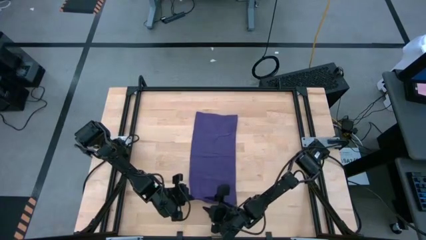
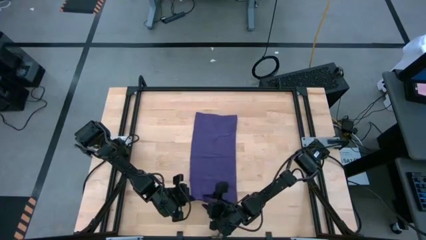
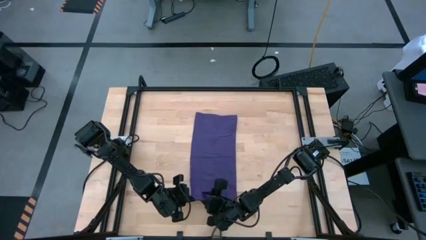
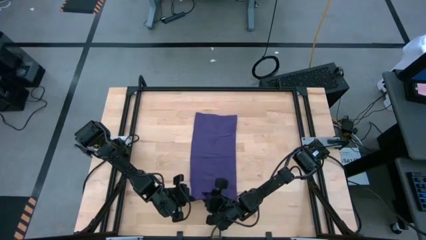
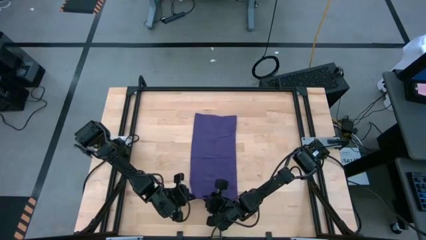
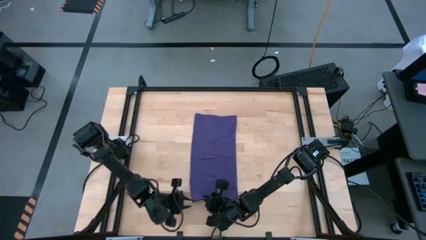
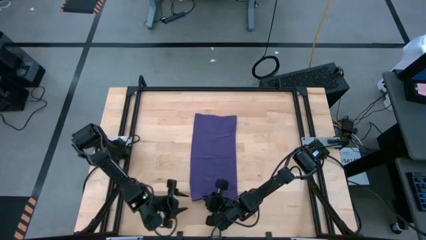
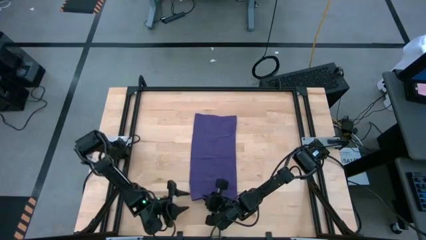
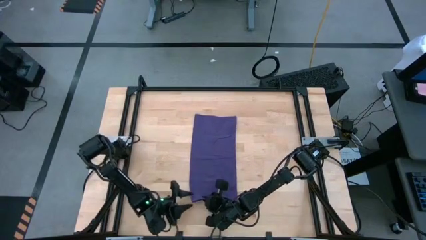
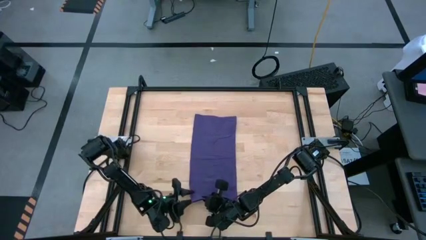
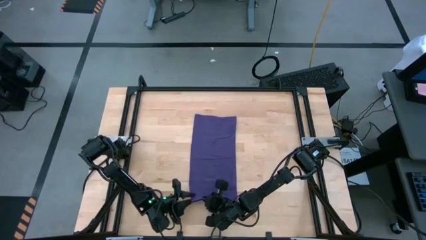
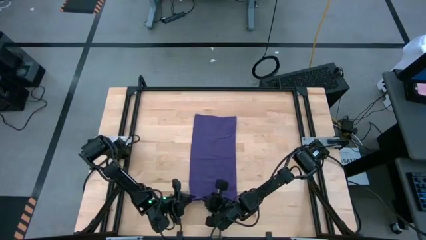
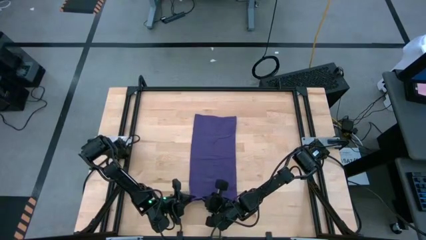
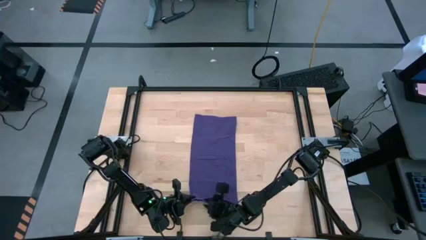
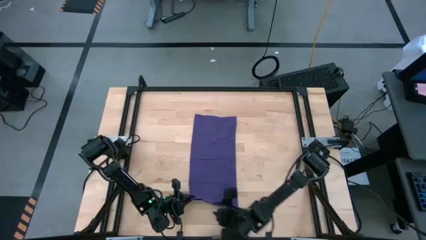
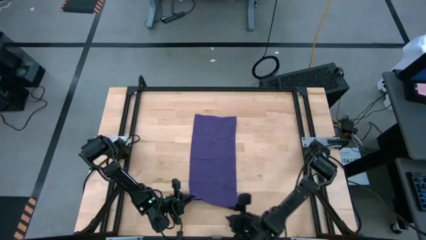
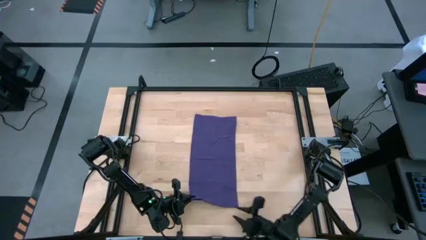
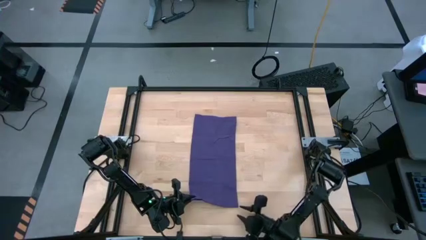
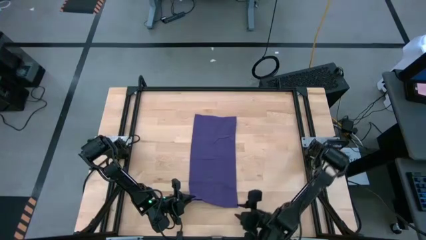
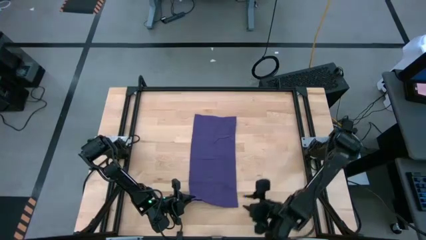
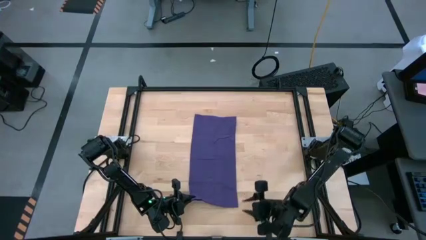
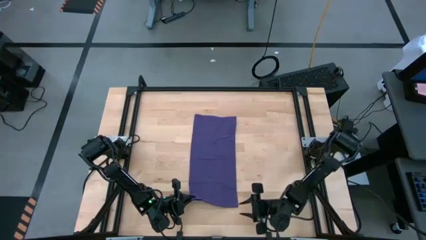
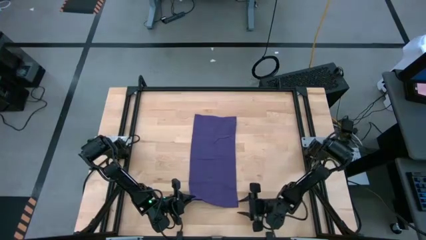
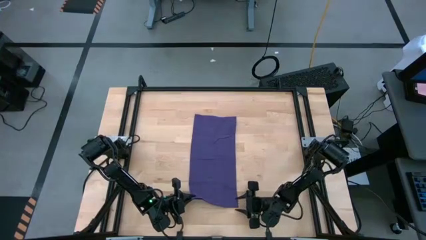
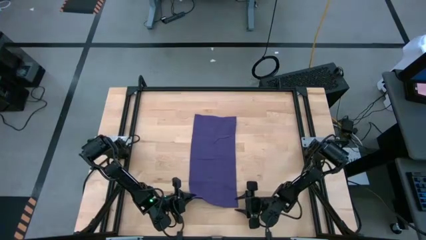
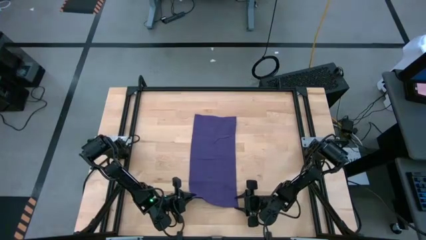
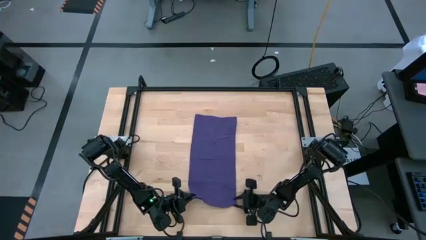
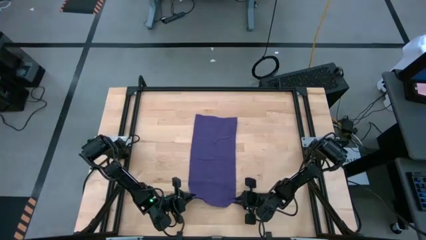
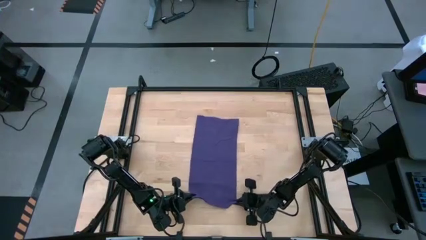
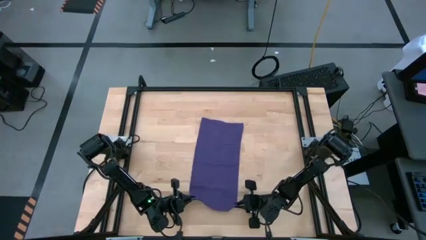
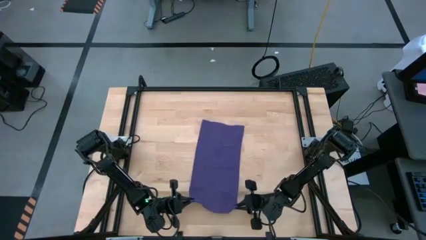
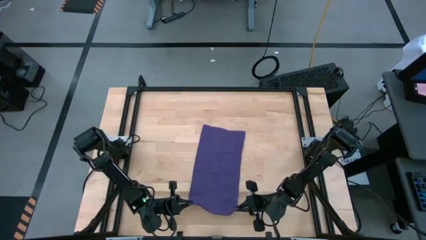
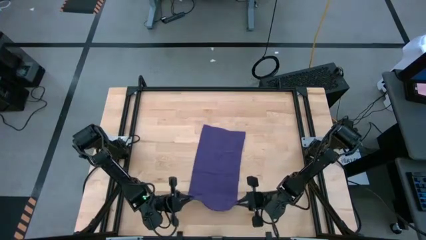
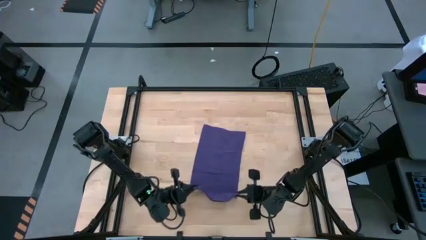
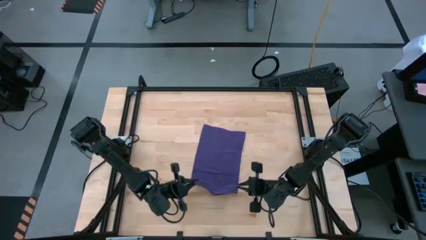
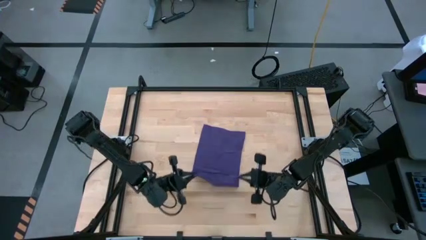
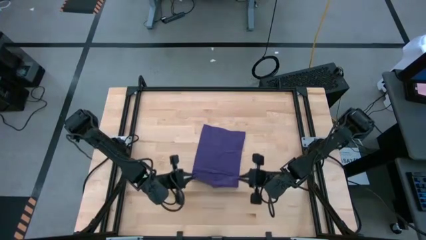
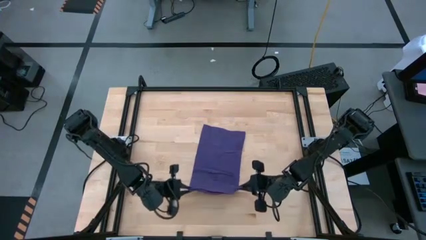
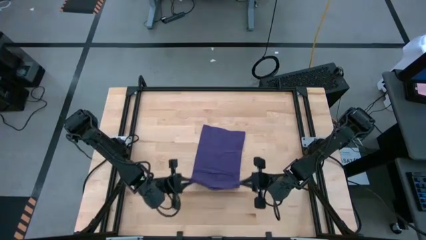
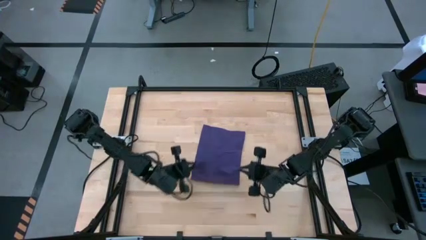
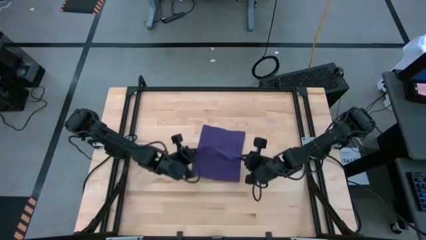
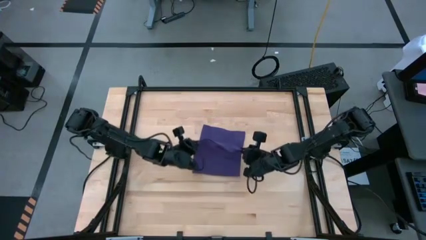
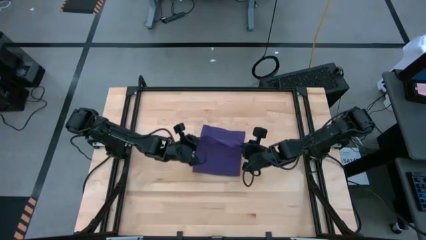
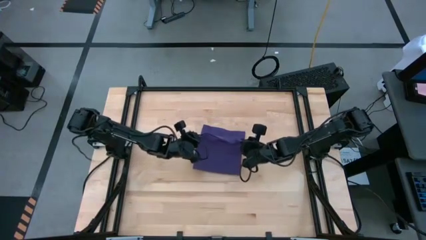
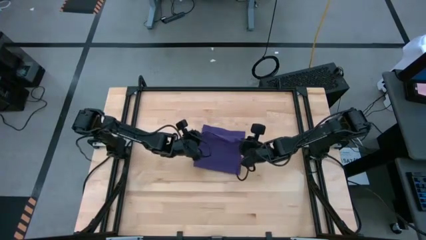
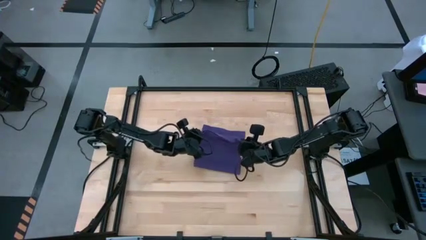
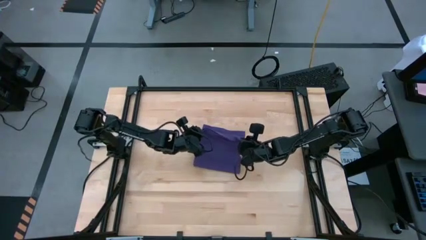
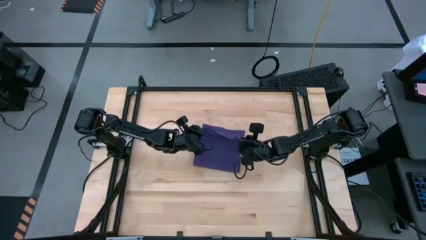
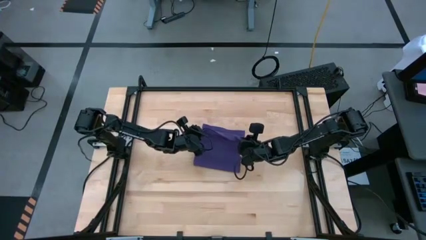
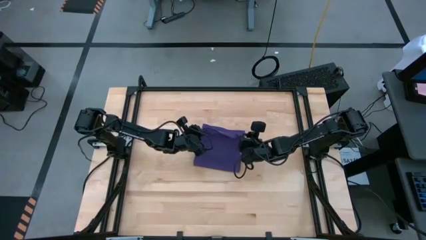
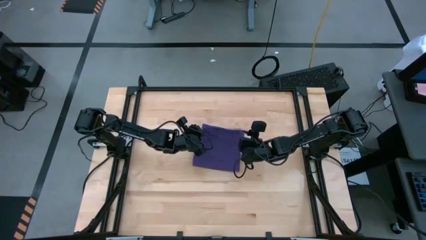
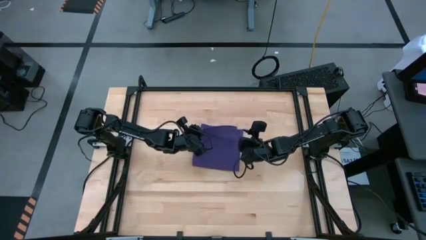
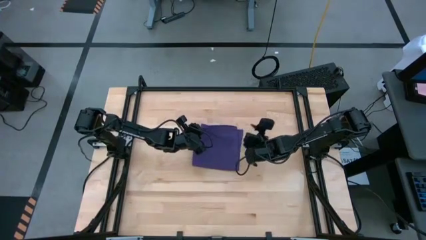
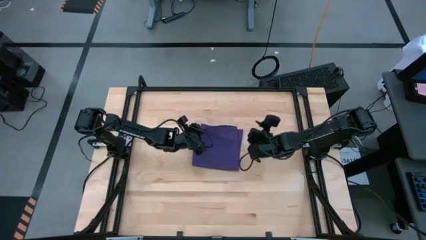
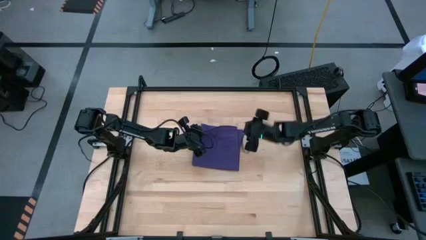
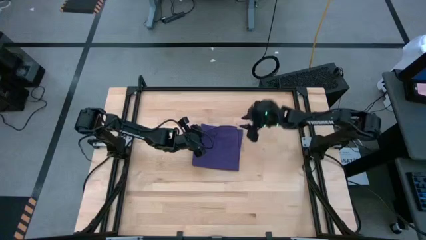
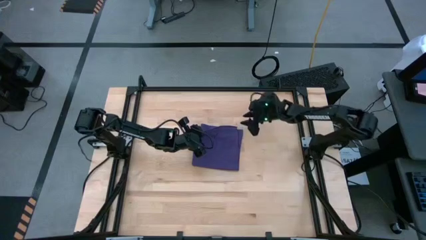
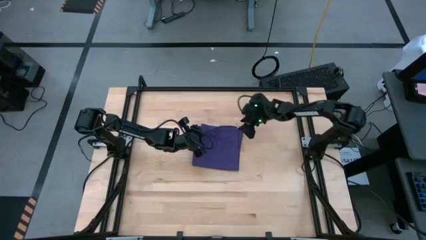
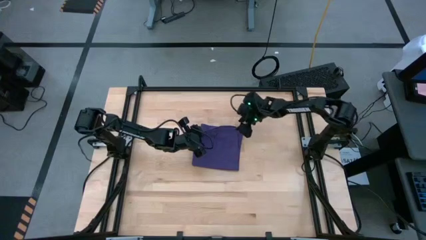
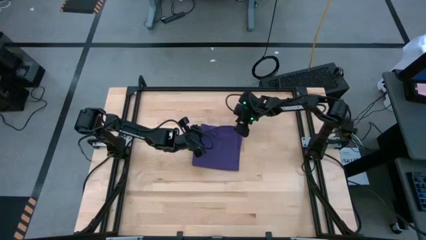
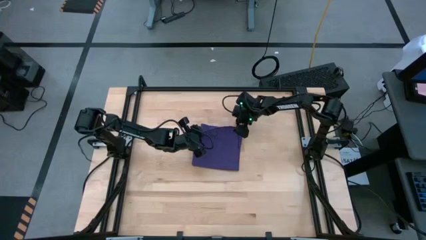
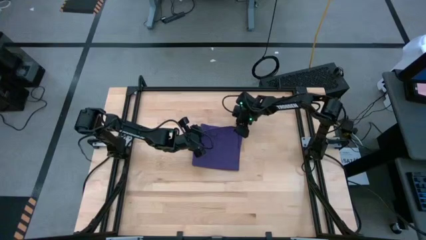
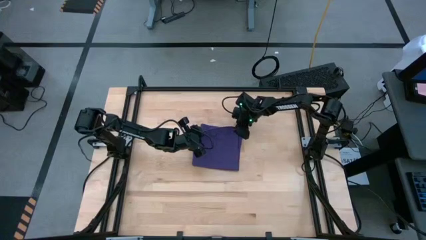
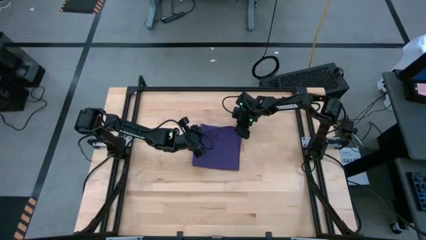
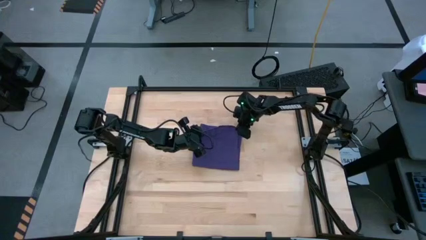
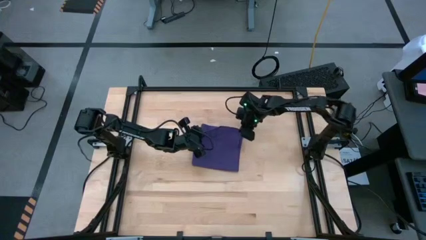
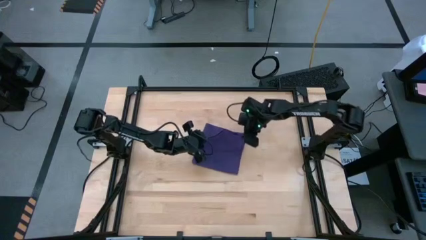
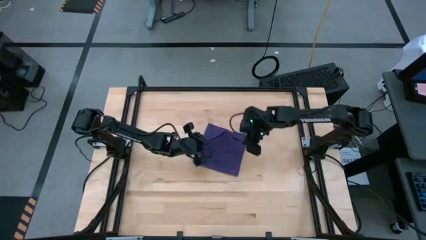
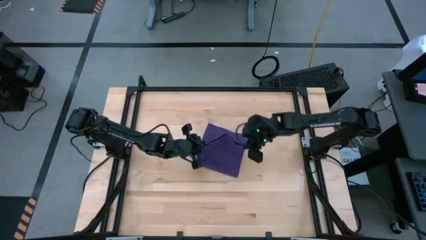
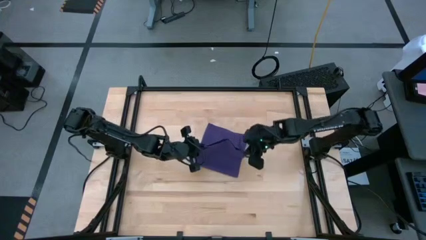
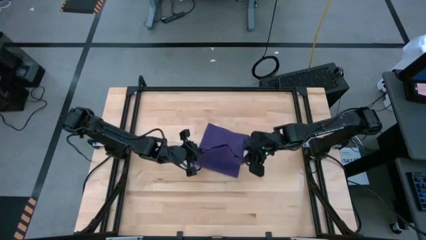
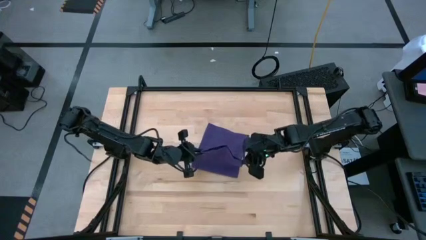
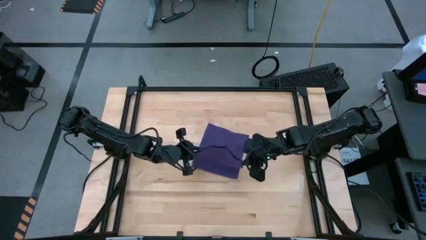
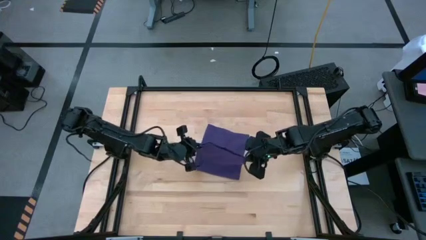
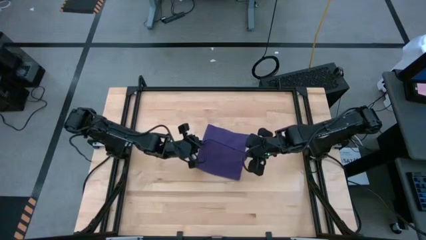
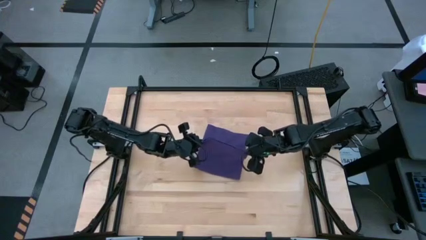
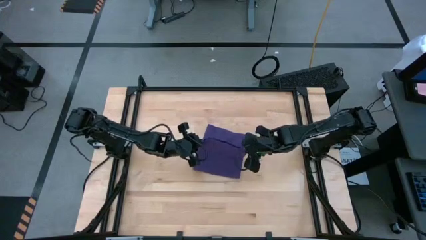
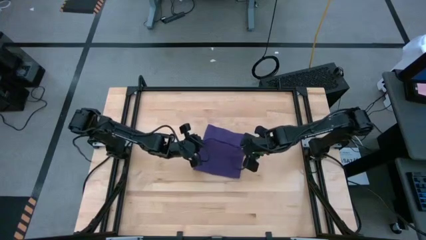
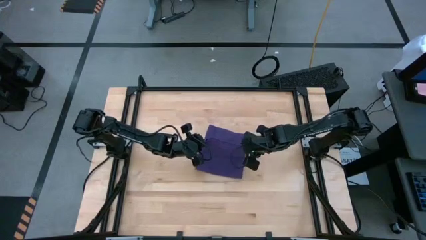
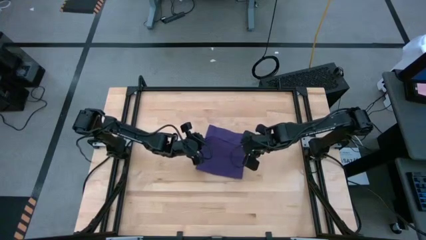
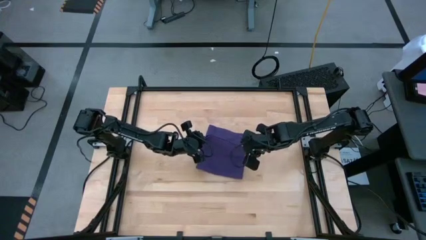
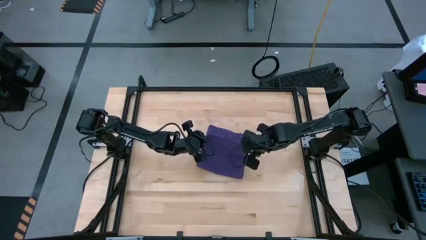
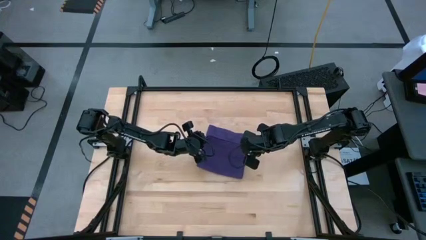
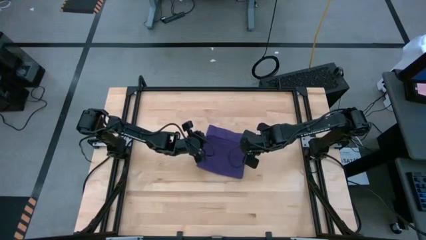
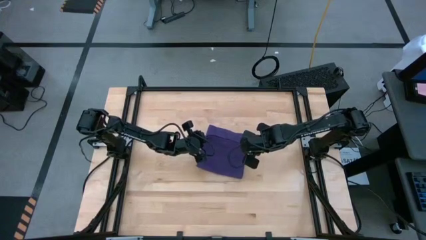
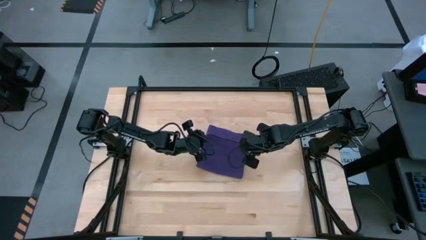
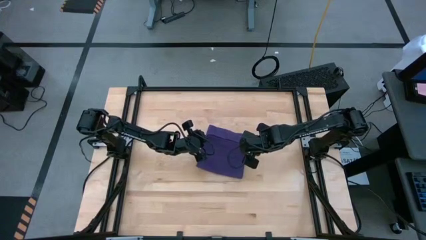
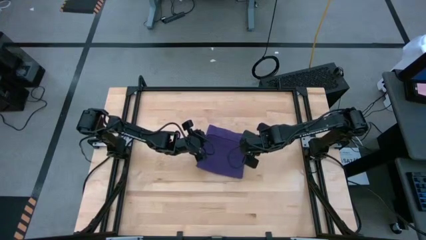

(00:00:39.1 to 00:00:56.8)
Task: Roll towel
Roll the purple towel
